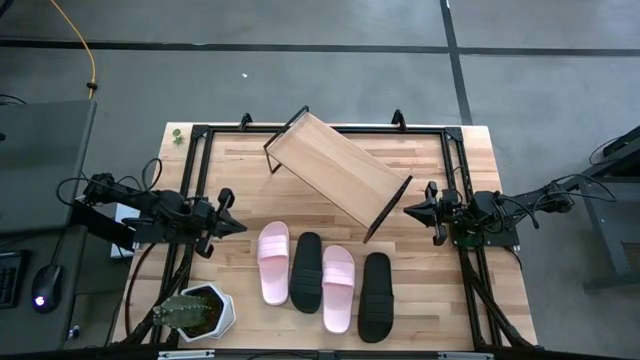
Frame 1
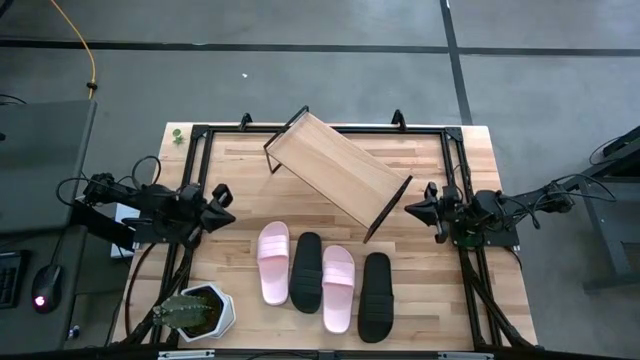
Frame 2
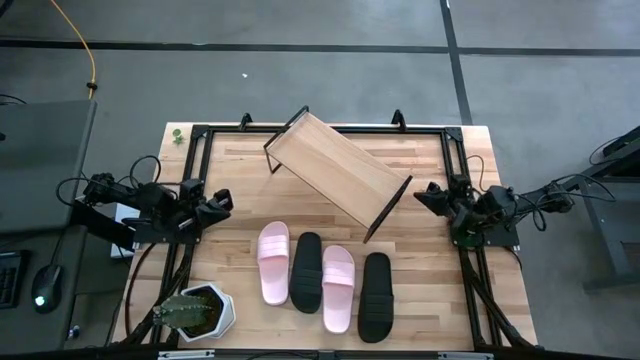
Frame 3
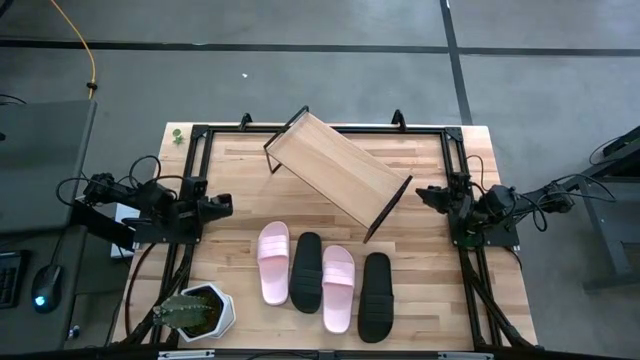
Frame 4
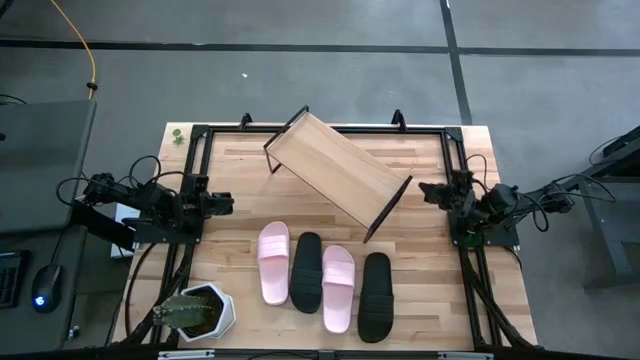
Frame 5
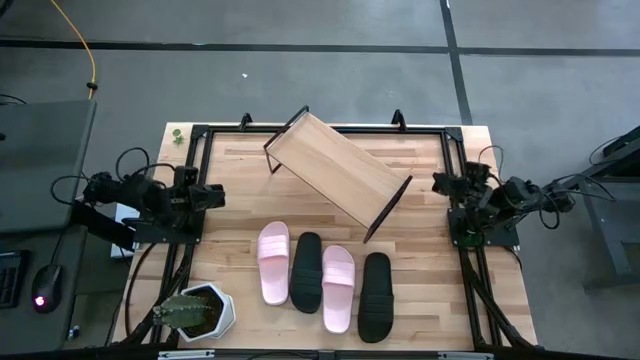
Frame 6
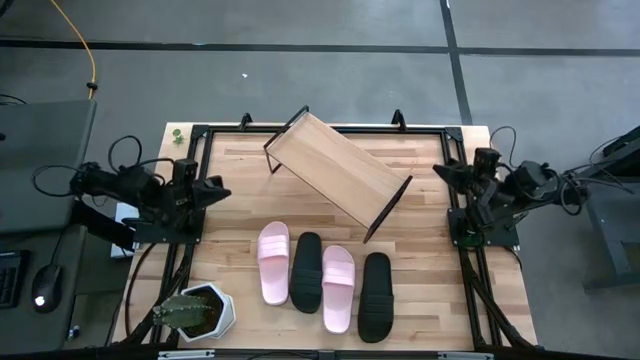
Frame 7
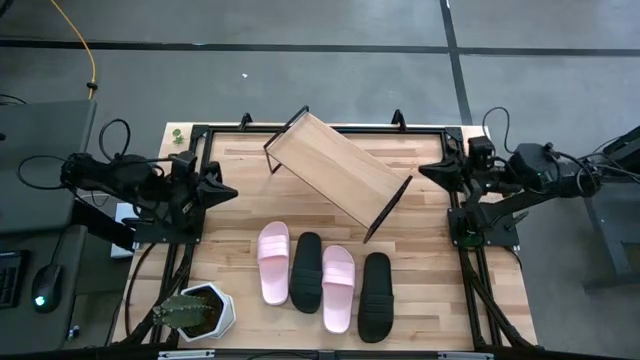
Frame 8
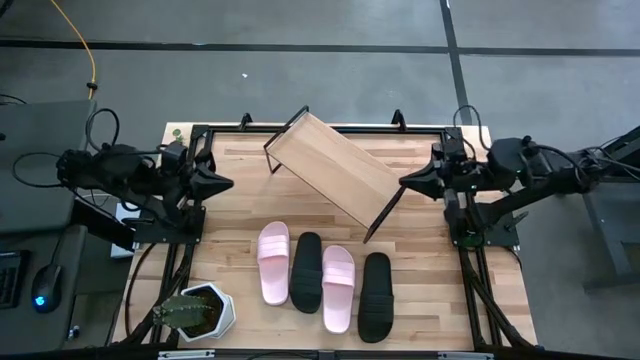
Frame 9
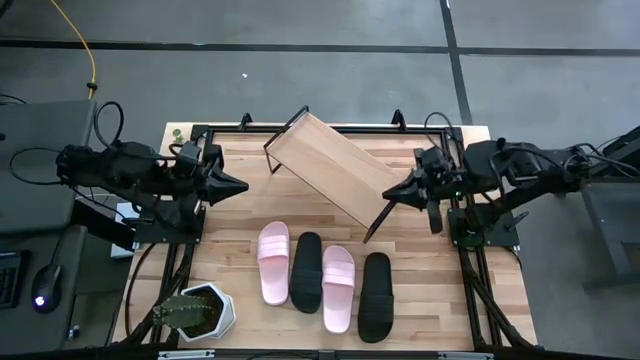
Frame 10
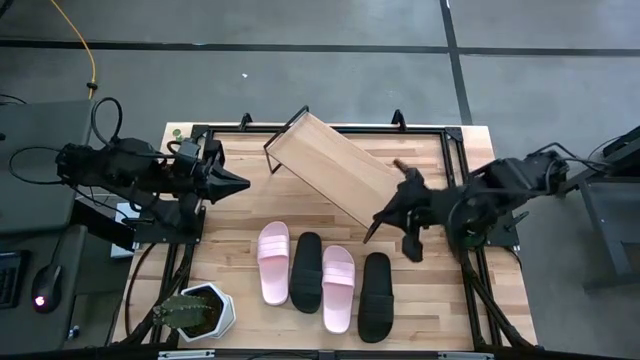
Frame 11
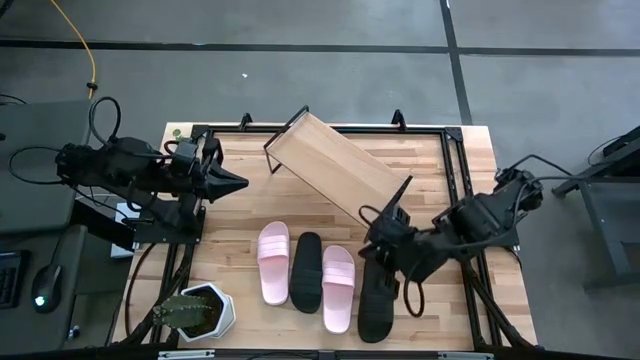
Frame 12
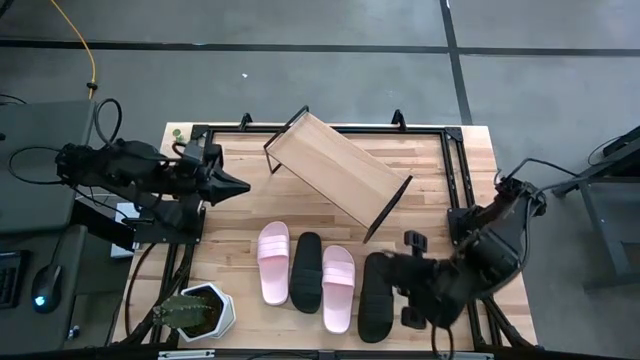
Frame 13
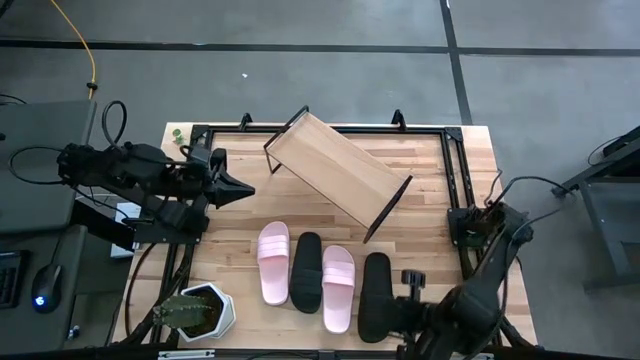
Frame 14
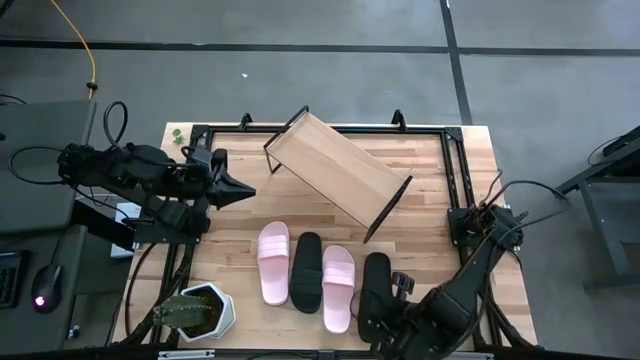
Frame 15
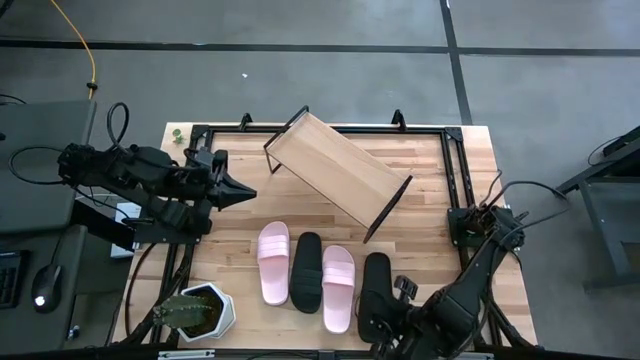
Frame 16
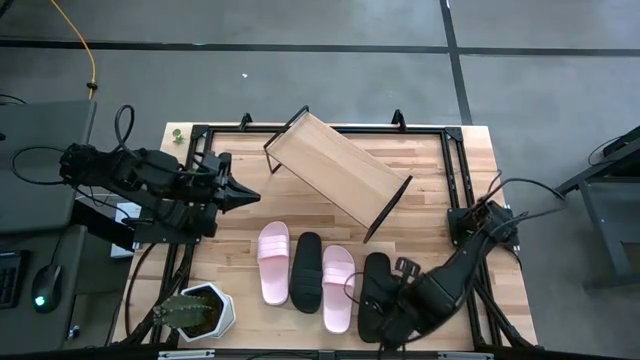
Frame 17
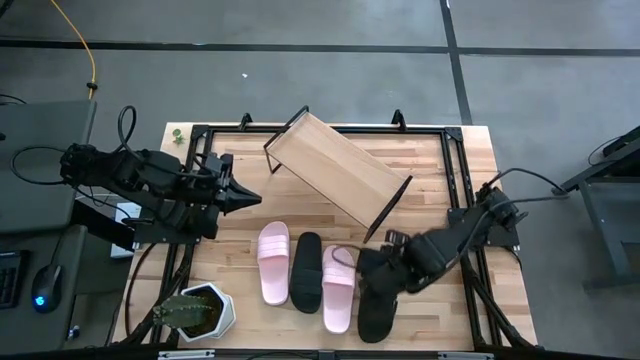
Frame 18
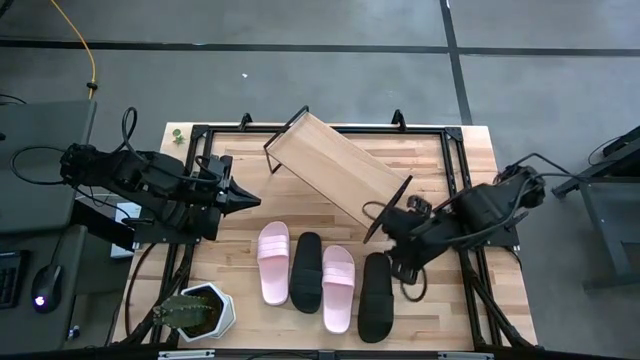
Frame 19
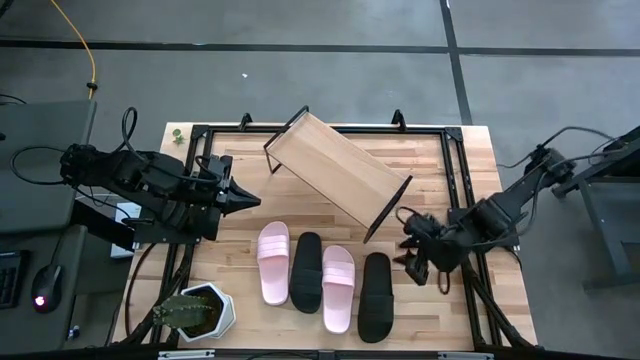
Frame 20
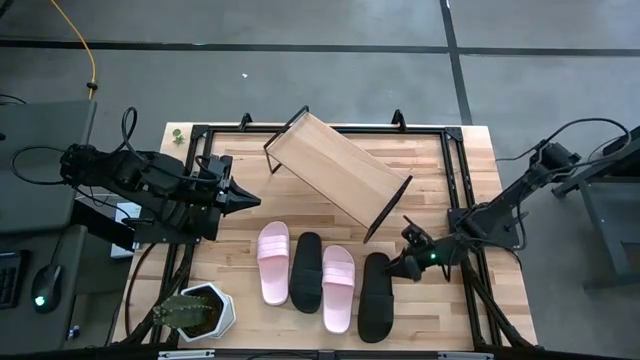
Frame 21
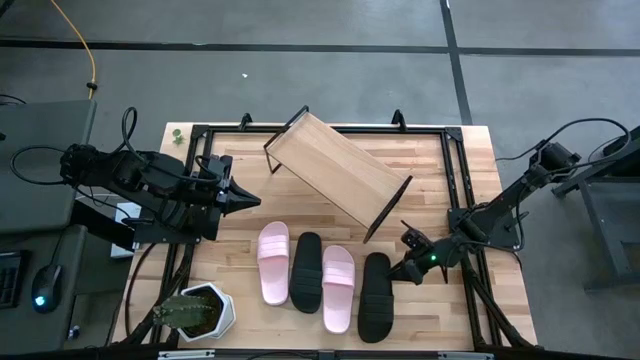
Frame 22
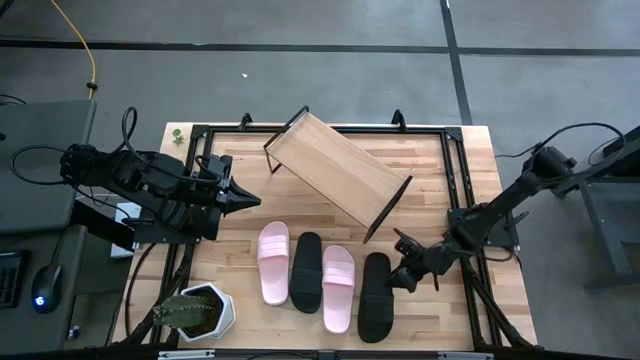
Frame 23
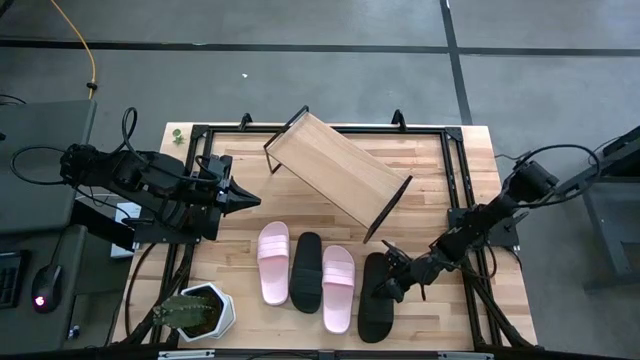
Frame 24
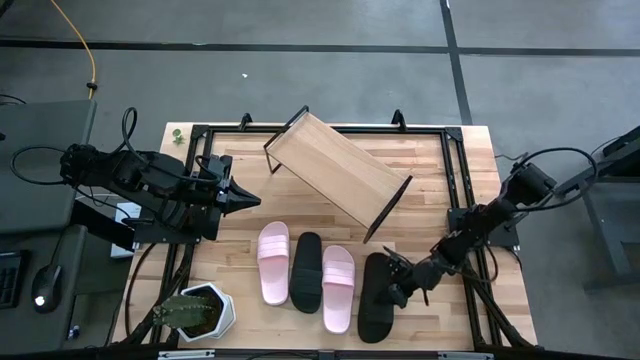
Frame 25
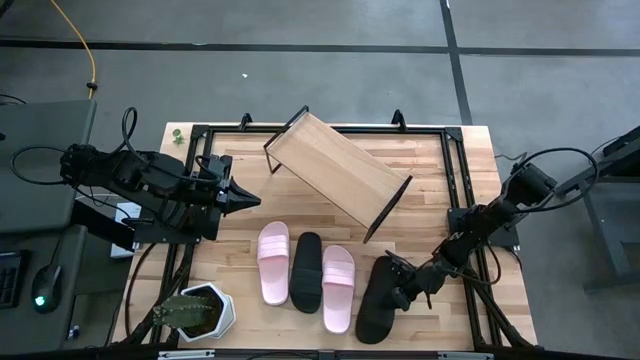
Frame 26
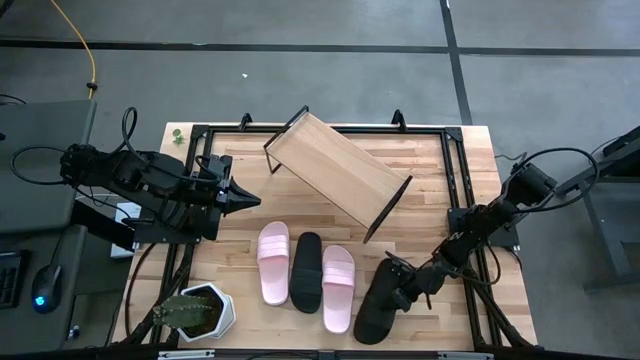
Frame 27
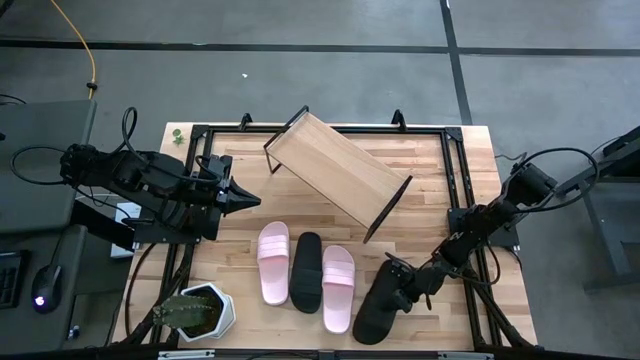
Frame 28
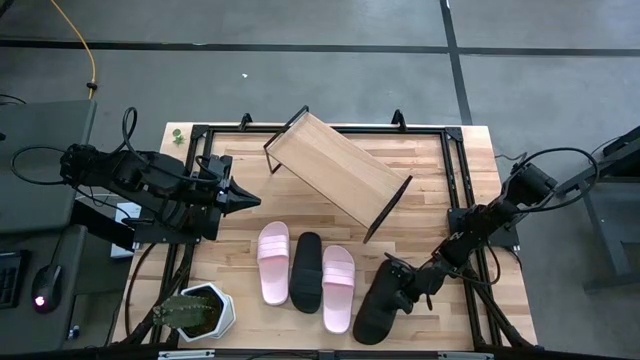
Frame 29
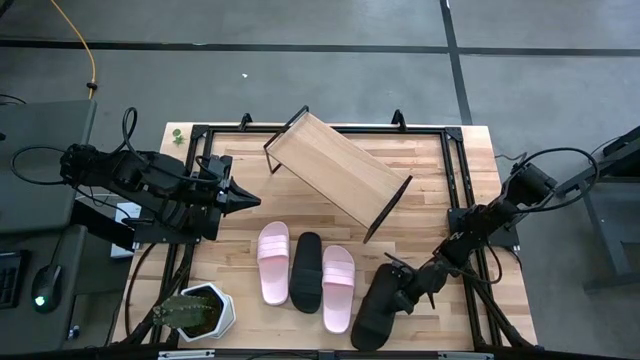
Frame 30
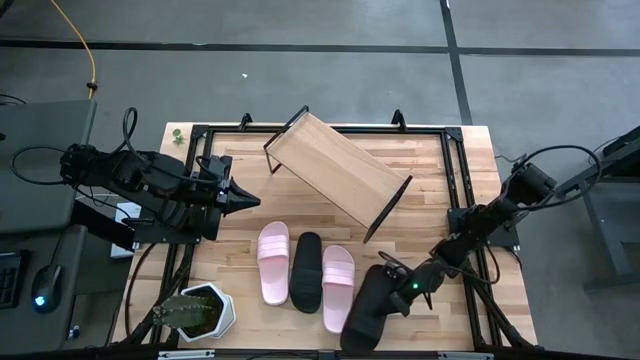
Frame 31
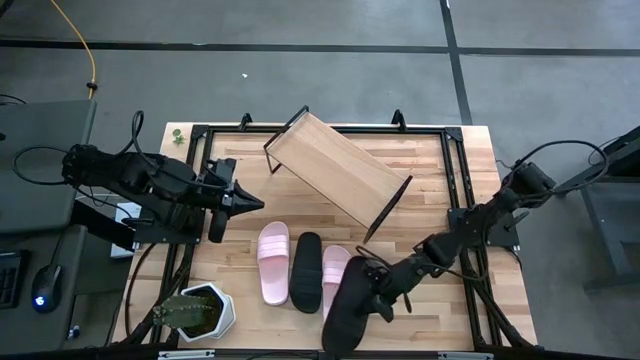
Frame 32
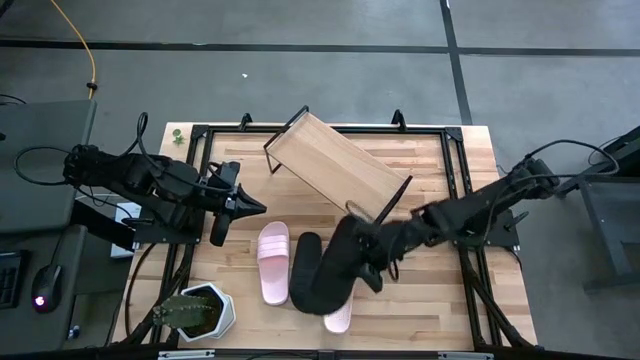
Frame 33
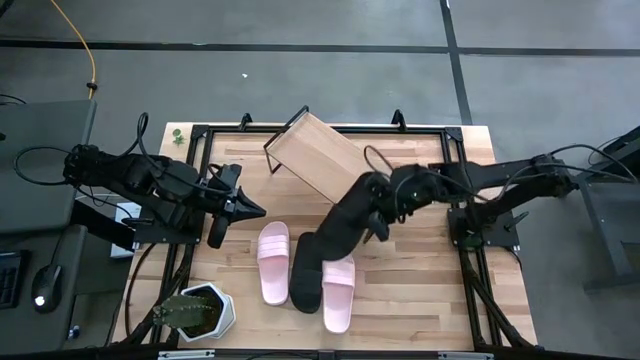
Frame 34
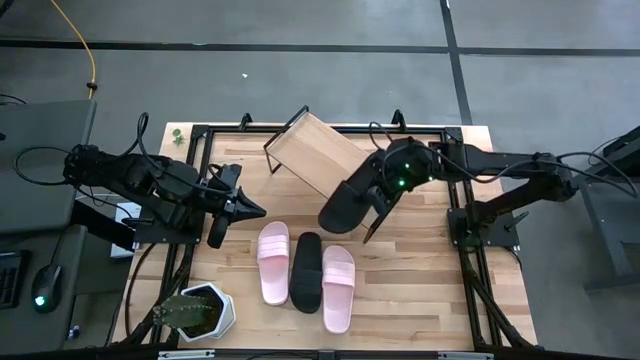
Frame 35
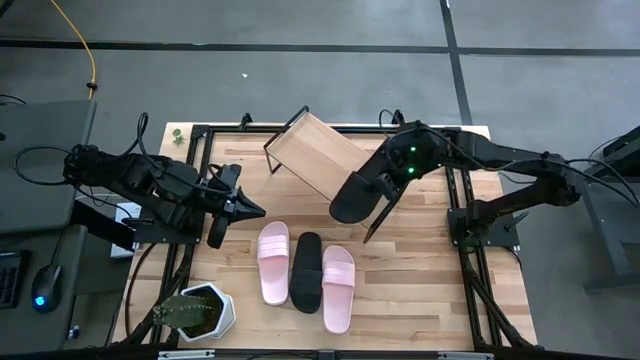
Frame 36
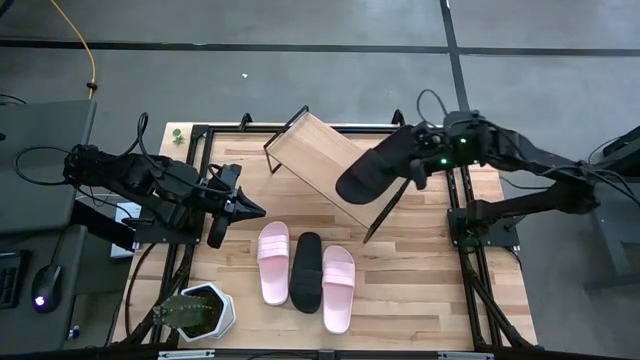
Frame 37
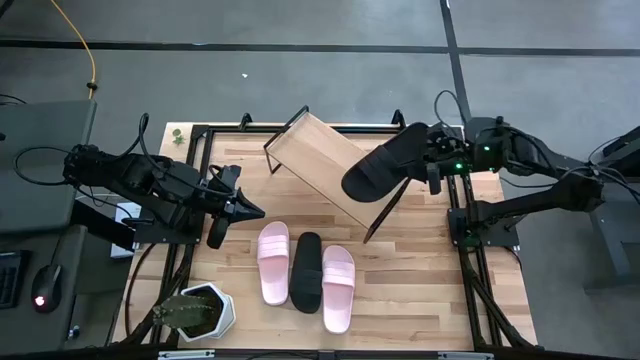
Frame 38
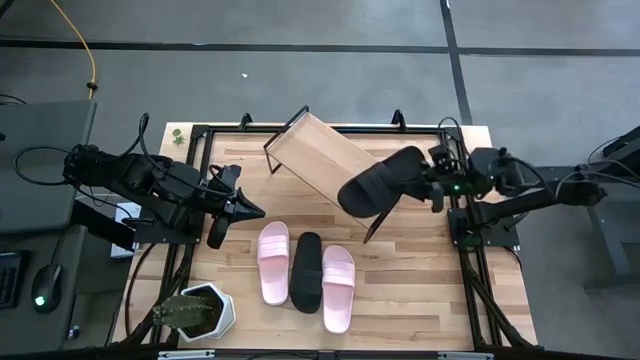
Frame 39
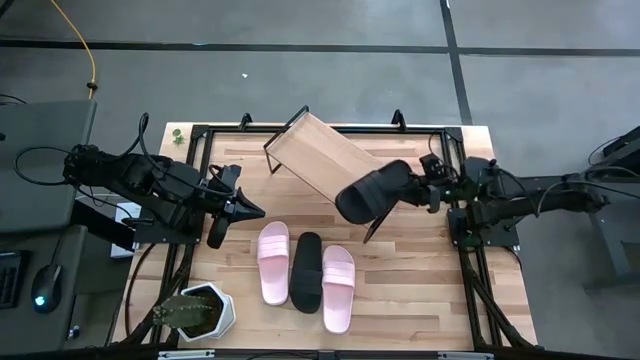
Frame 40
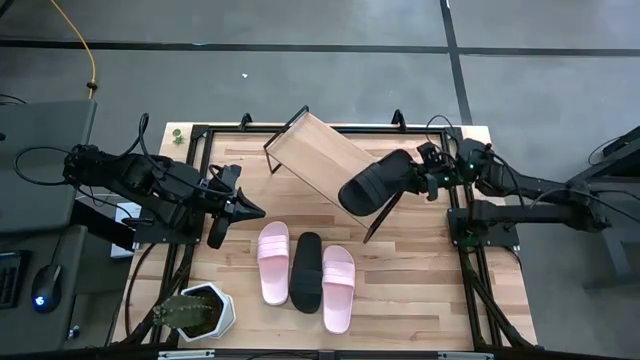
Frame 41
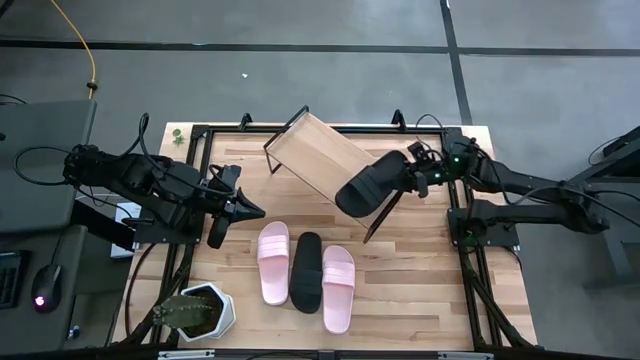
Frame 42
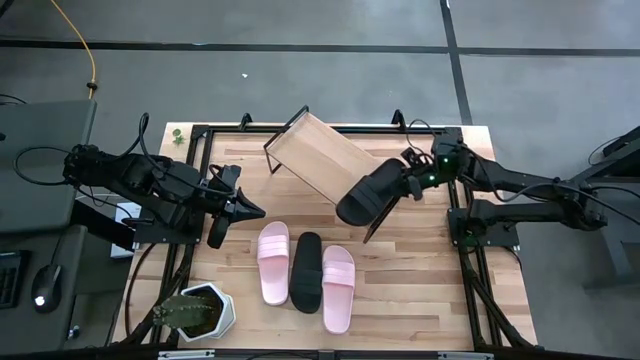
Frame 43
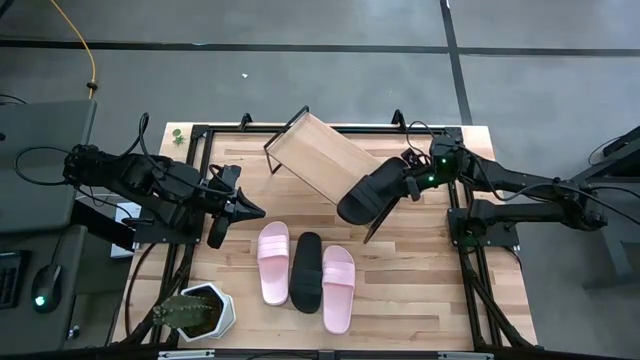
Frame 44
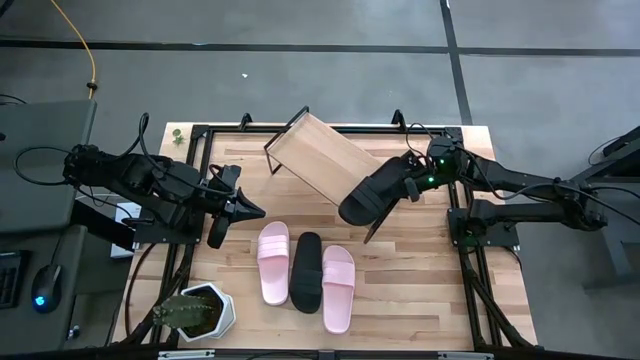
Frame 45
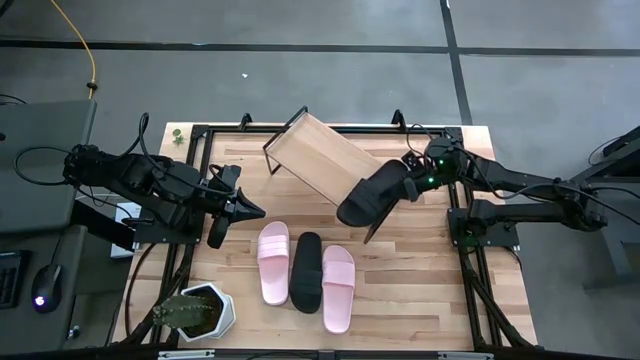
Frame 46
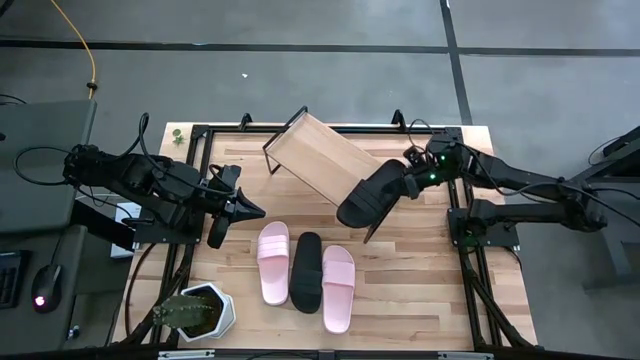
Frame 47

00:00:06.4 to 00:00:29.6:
Task: Pick and place slides into the shelf
Put the right black slide on the shelf
